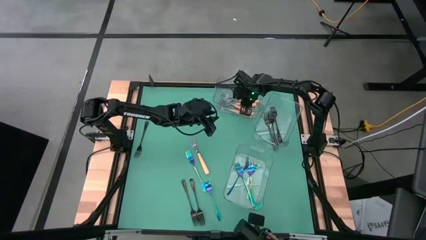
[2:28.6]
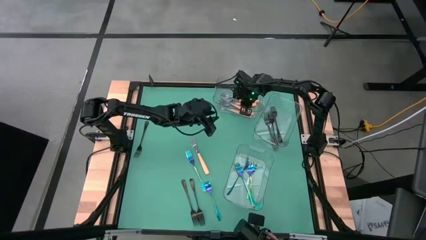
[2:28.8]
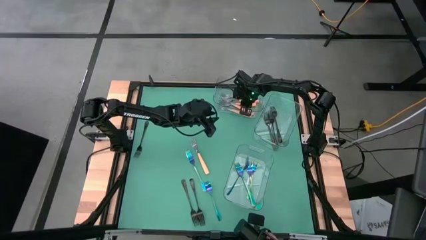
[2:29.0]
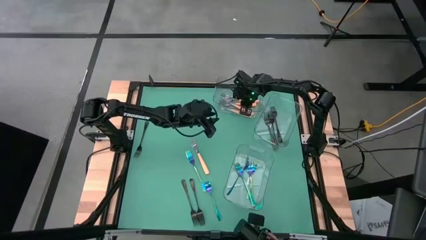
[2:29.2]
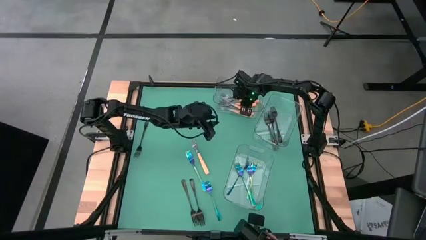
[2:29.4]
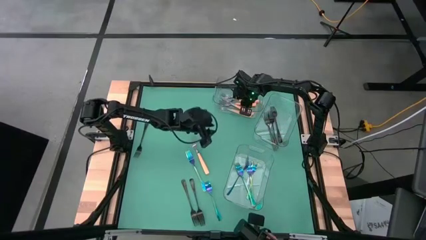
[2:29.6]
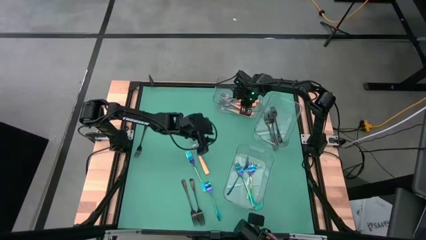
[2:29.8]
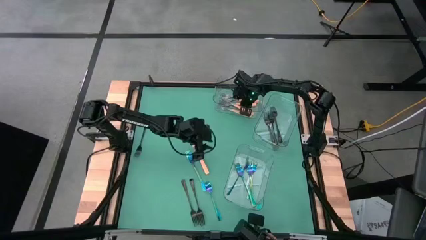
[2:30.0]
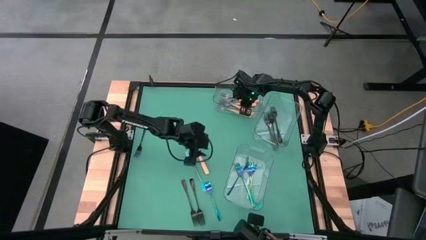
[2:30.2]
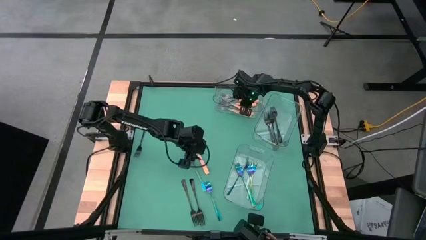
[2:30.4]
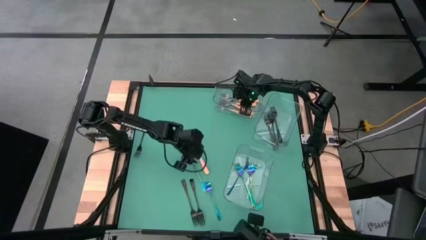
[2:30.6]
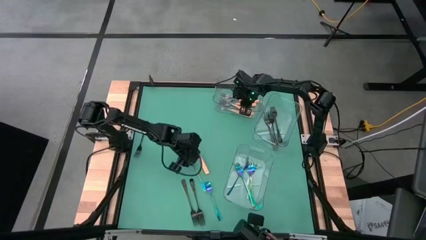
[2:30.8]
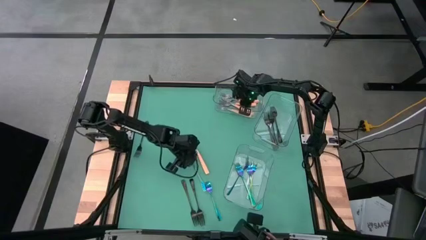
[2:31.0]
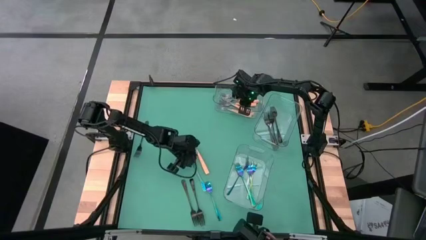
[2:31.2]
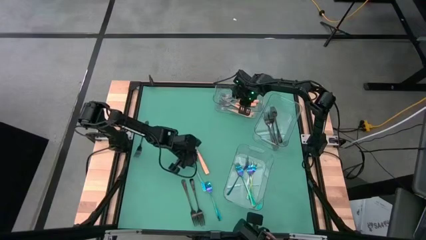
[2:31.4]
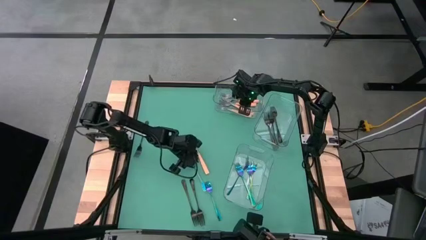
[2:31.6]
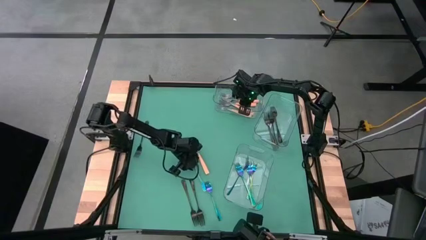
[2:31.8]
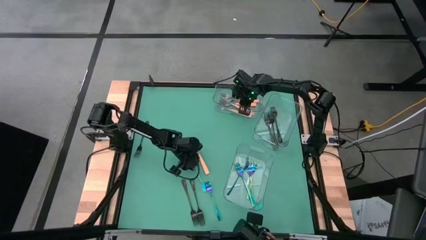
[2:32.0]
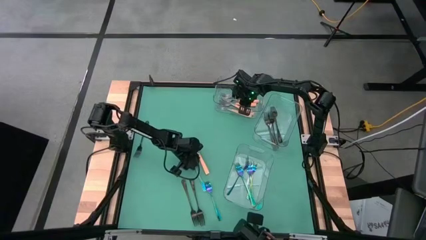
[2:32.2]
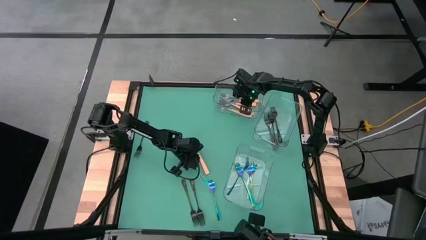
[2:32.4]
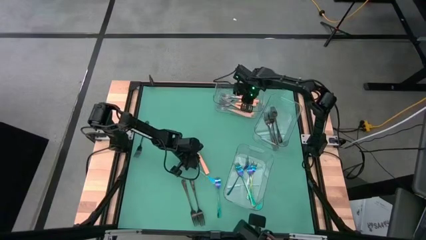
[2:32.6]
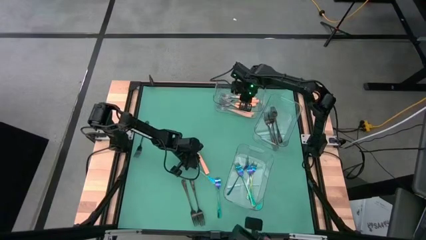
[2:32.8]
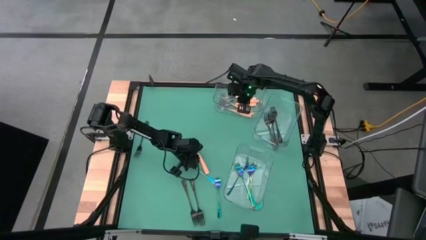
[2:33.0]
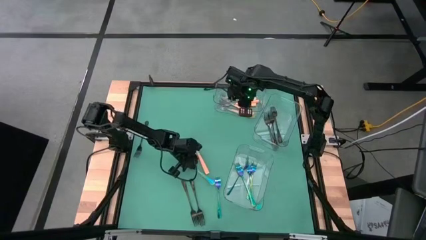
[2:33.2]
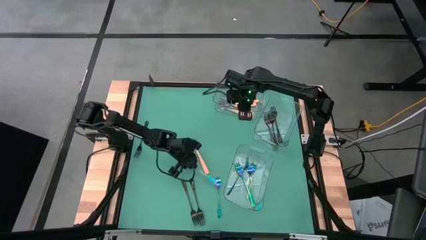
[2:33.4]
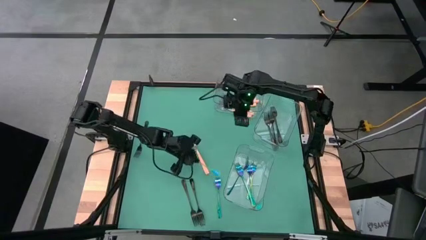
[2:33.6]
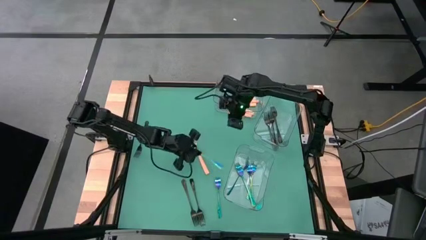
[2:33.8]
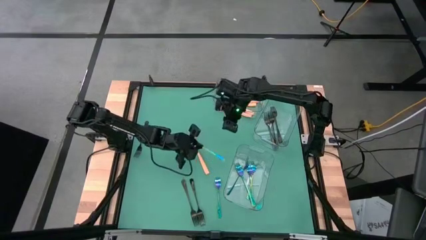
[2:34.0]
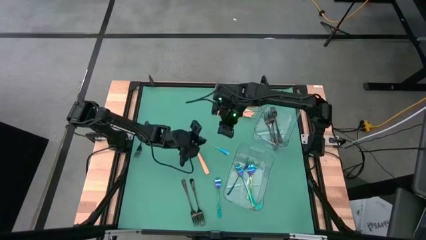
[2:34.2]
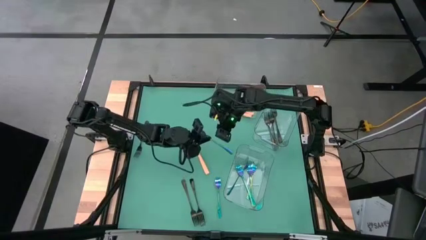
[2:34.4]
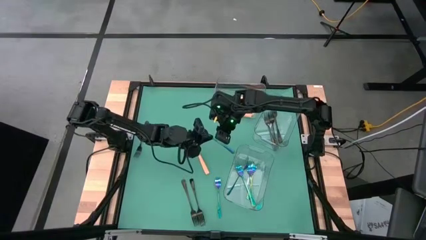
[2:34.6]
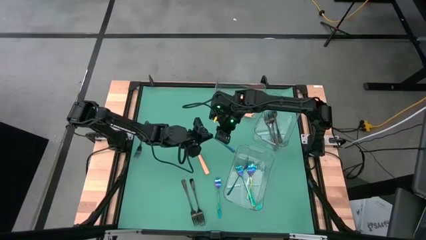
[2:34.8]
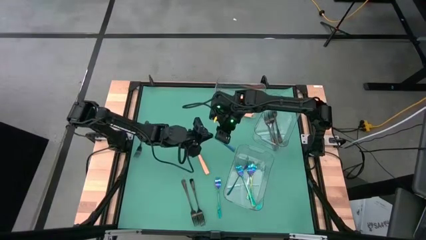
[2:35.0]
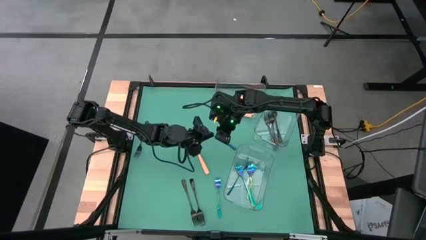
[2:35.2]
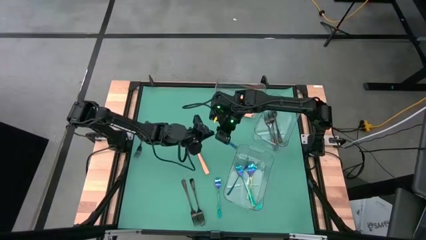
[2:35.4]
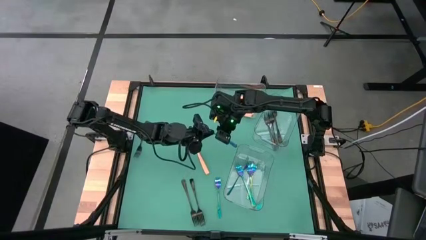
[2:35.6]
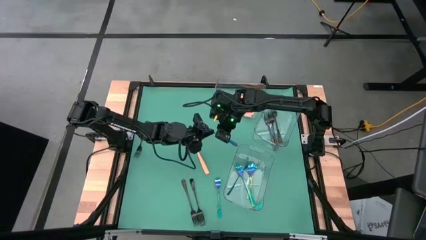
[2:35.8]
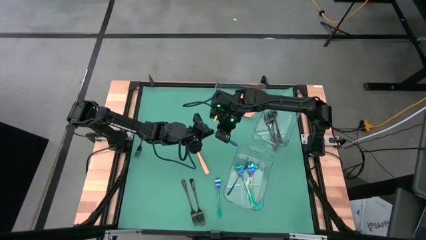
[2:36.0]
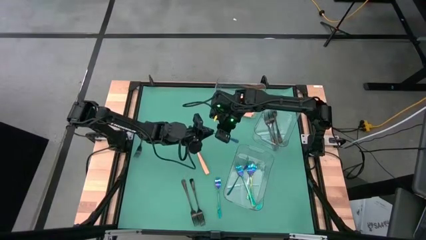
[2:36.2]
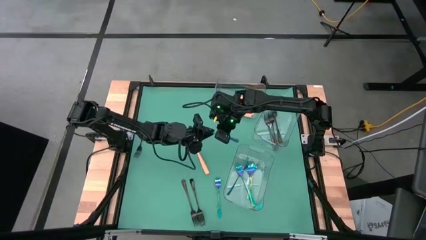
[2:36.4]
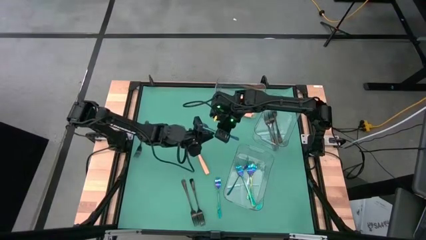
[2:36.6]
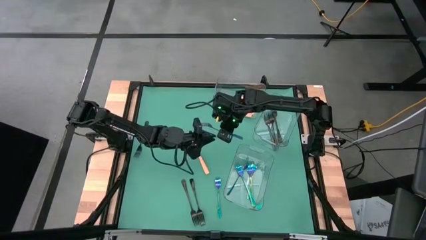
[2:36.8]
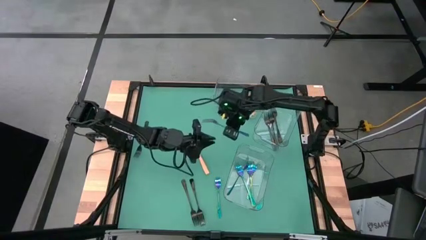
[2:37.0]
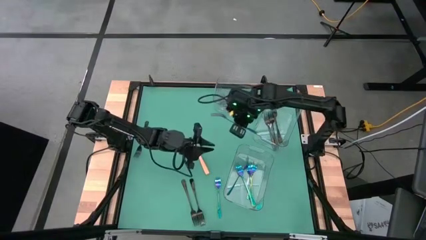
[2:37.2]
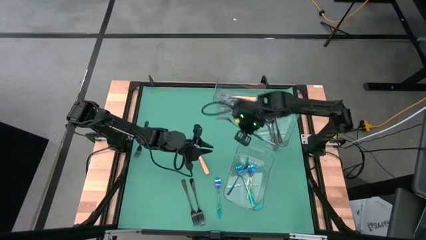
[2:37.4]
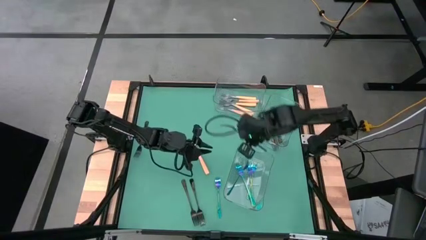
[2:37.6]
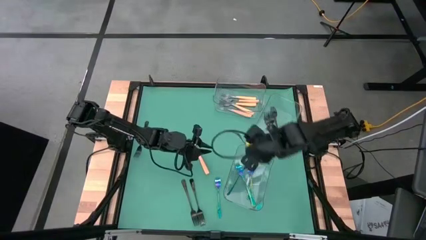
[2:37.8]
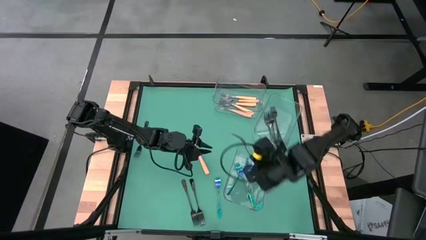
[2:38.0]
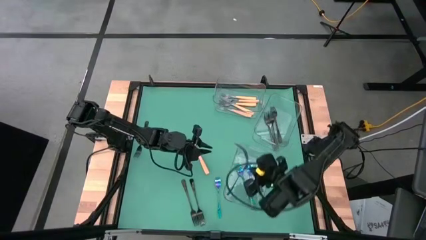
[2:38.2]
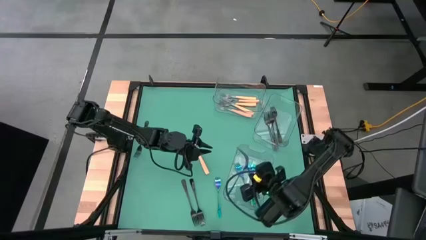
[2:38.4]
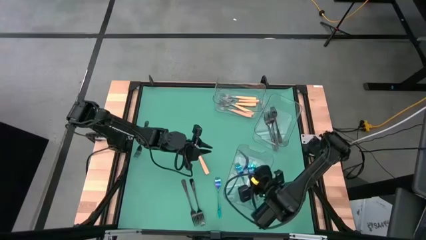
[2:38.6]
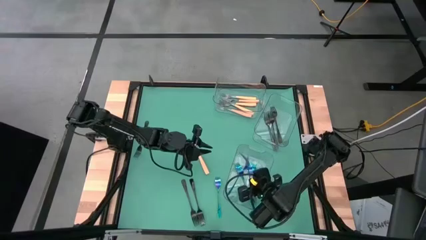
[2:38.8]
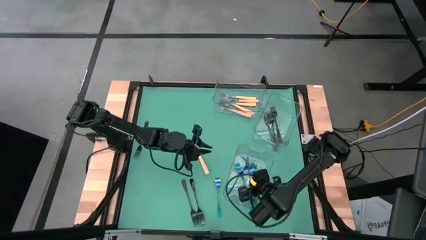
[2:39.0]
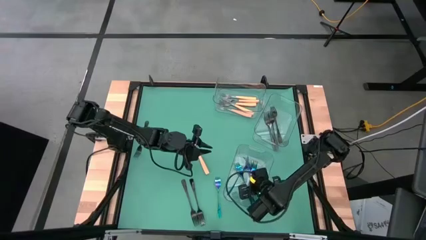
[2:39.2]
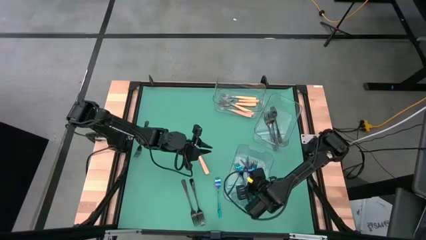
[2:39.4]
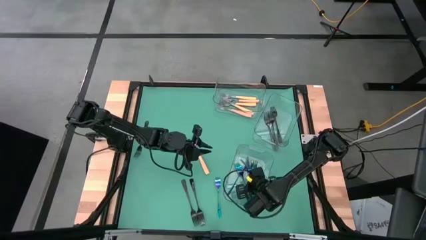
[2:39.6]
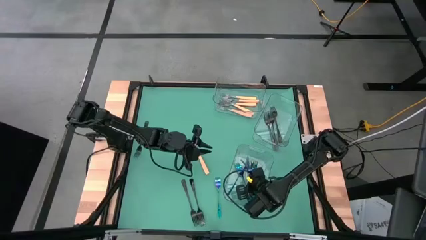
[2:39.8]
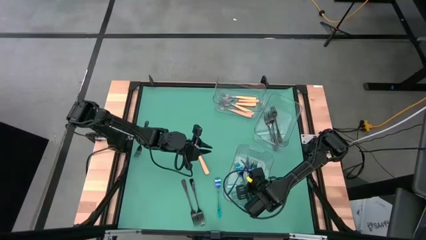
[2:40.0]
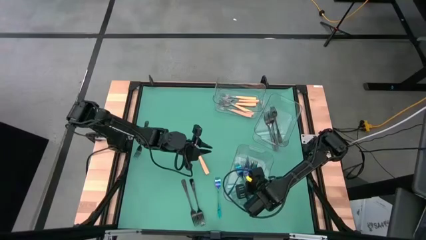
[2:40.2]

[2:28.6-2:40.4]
Task: Sort silverware by color (type)
Put the blue fork into the bottom transparent bin

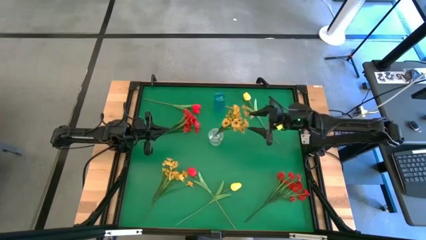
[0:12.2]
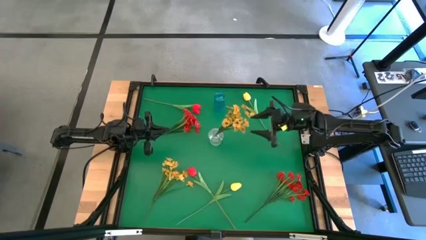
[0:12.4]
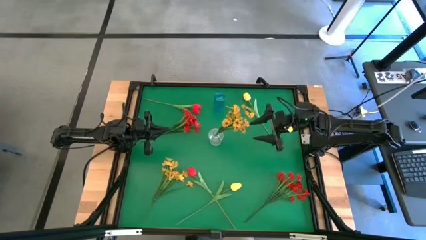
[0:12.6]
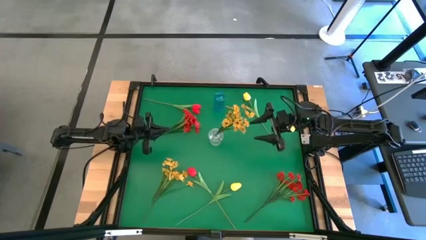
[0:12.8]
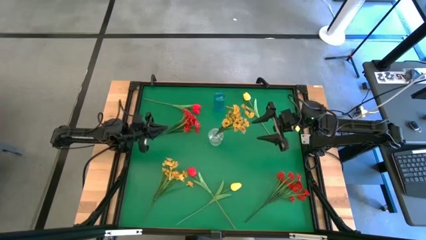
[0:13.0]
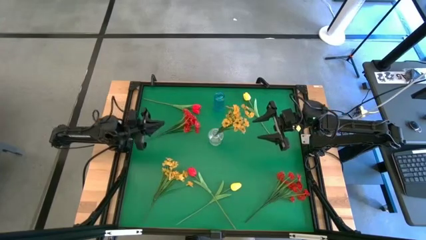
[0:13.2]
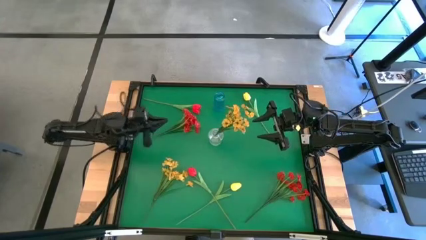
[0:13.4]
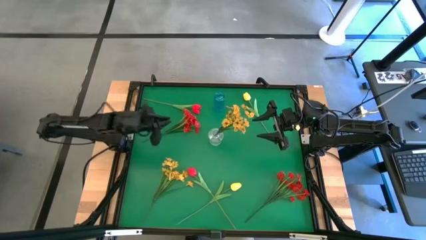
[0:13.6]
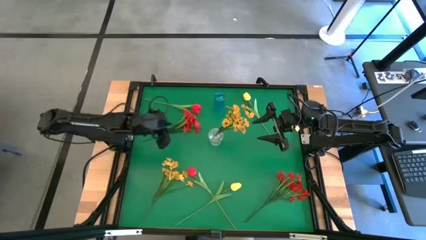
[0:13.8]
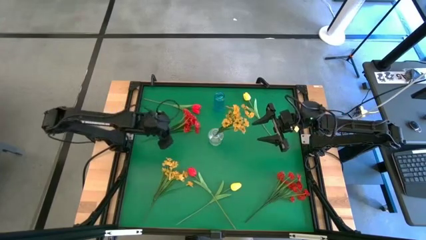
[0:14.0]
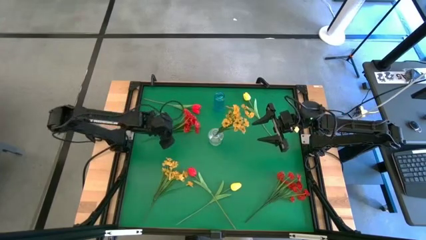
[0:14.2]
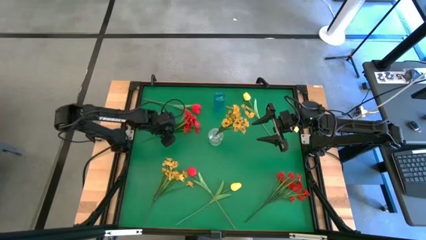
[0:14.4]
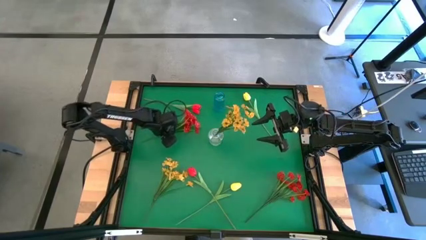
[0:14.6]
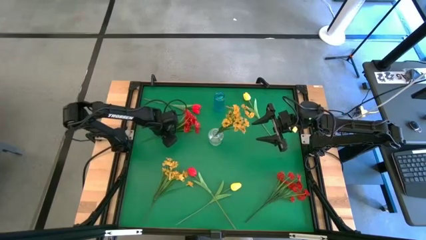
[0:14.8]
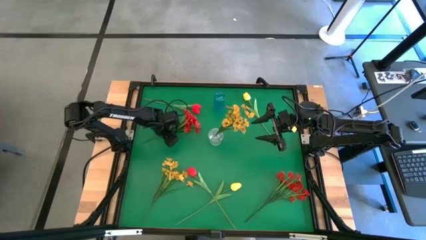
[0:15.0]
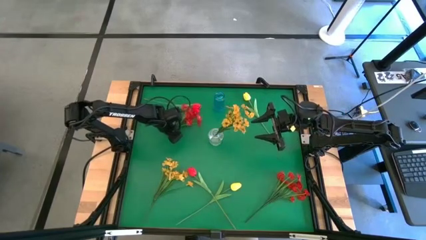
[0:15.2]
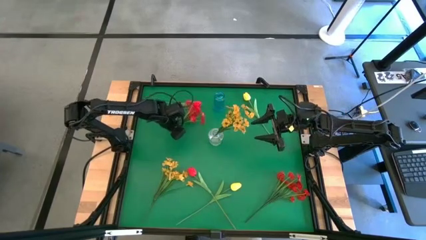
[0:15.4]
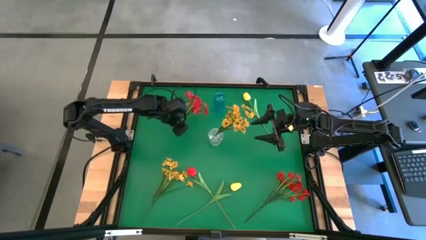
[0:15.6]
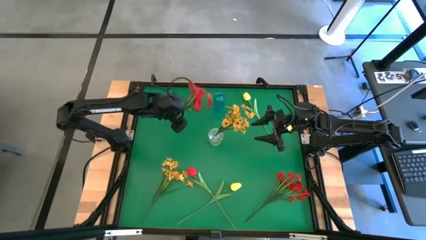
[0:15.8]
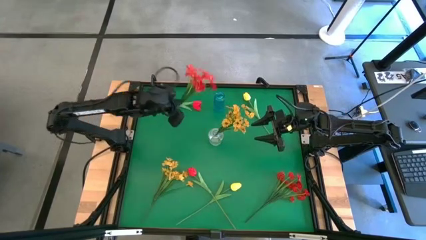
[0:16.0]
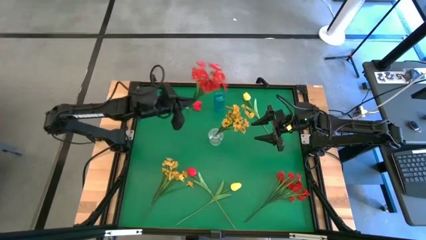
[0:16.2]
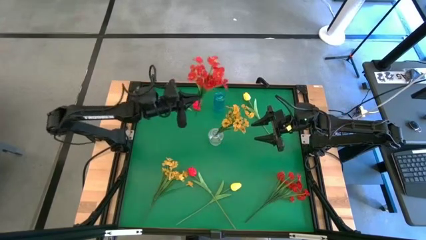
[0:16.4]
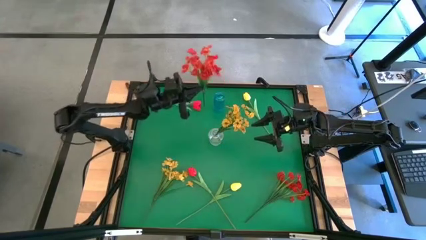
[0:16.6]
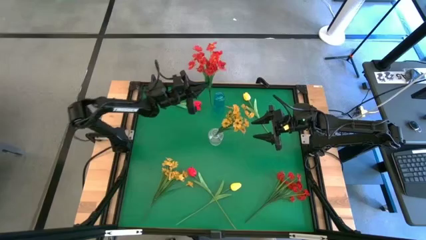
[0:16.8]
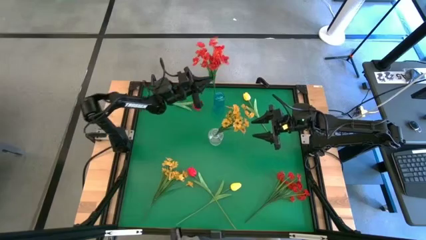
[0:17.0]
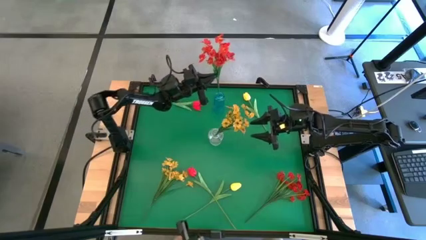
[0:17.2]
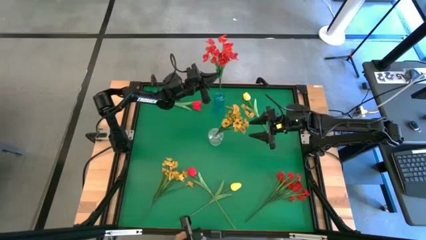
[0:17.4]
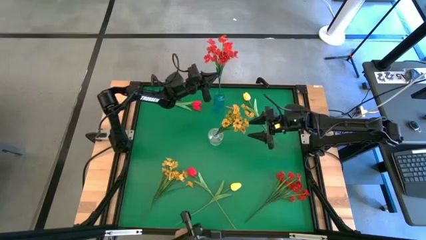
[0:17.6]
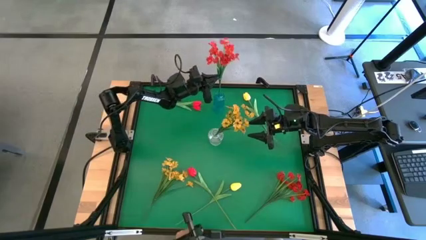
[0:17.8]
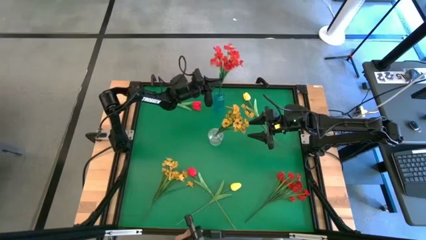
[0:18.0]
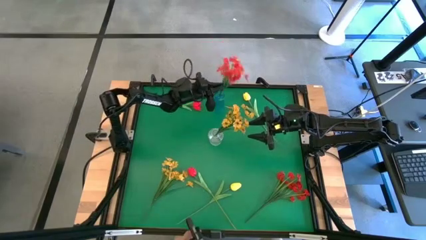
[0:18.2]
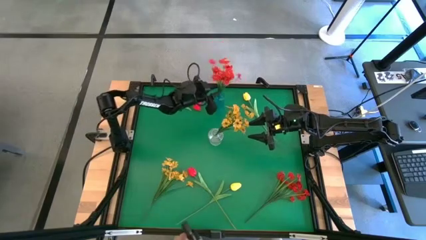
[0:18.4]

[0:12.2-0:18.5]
Task: Sort flowers into vase by color
Put the left red flowers into the blue vase
